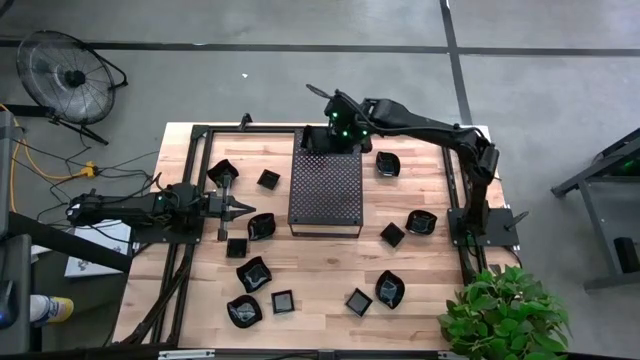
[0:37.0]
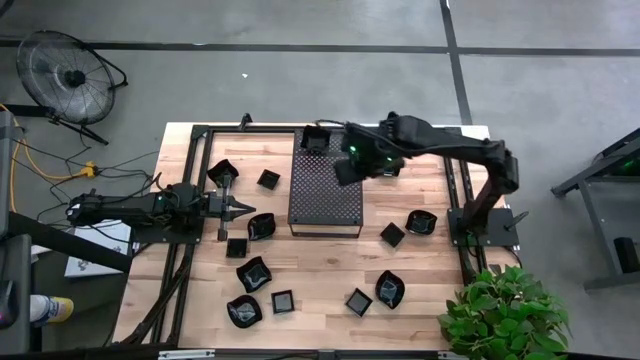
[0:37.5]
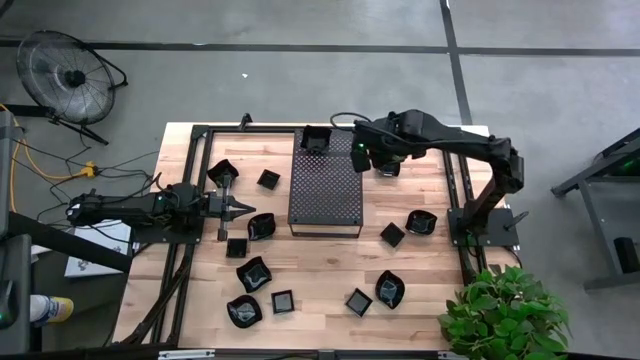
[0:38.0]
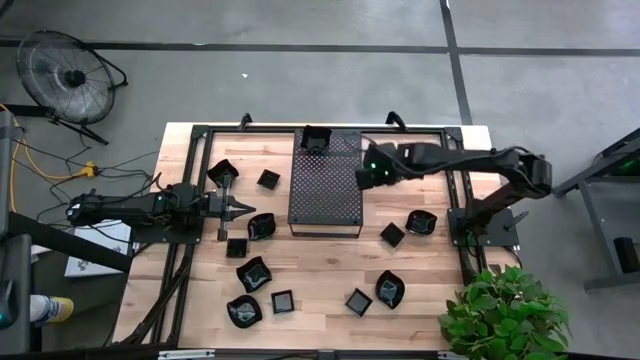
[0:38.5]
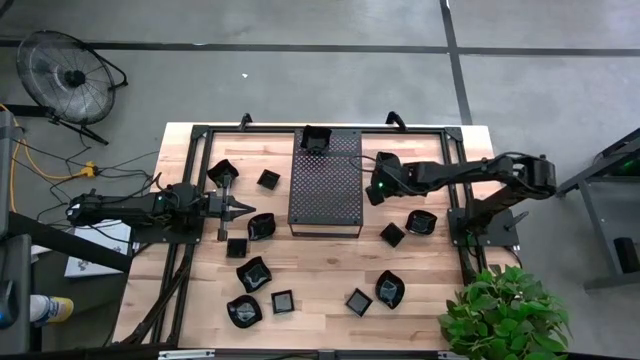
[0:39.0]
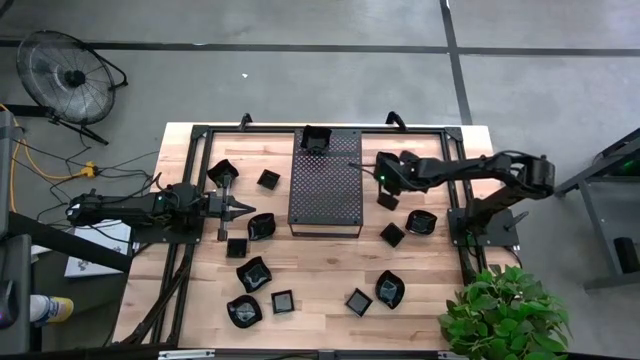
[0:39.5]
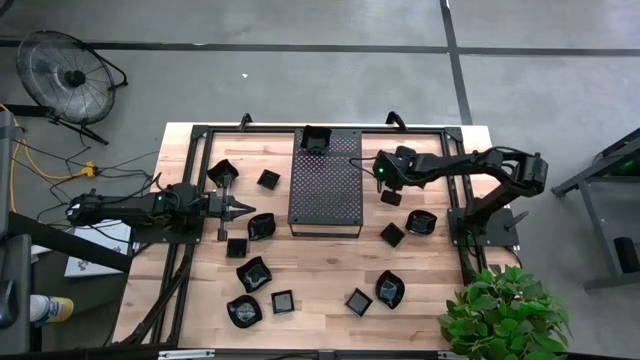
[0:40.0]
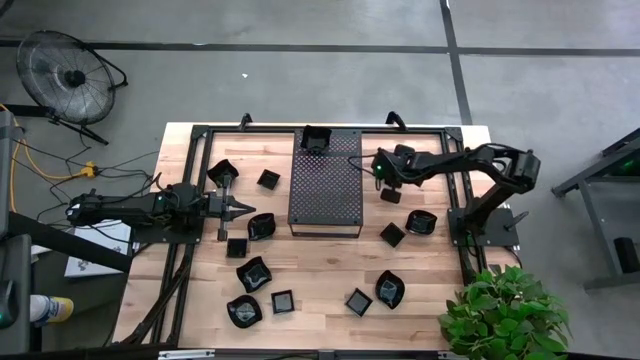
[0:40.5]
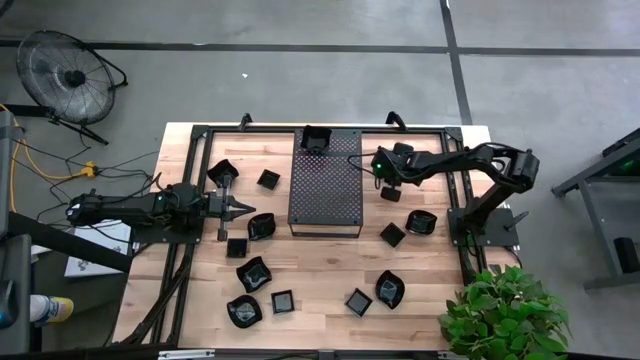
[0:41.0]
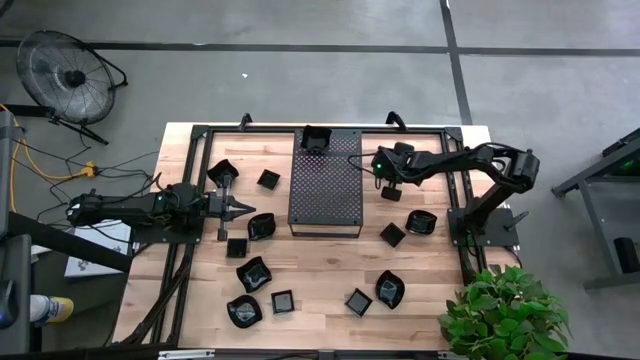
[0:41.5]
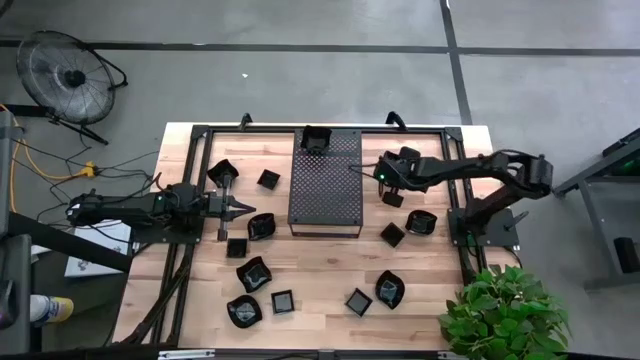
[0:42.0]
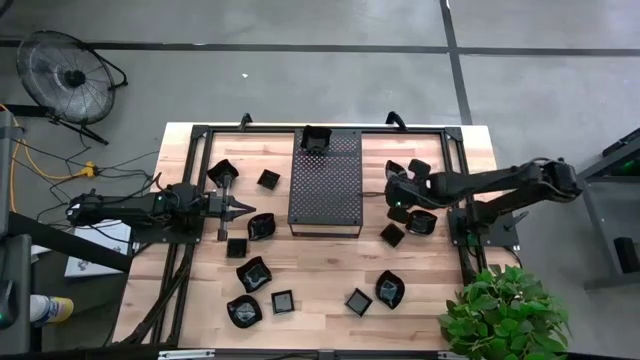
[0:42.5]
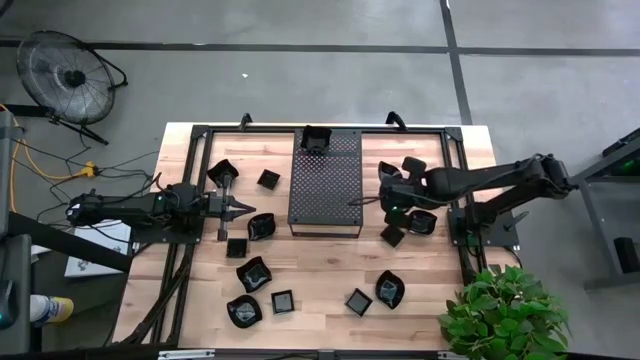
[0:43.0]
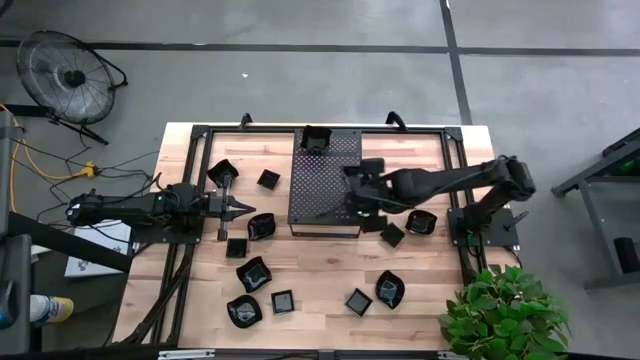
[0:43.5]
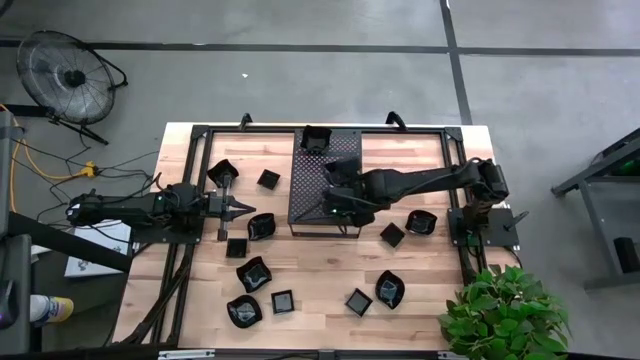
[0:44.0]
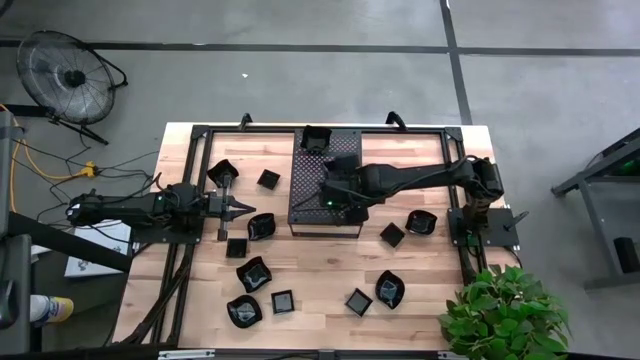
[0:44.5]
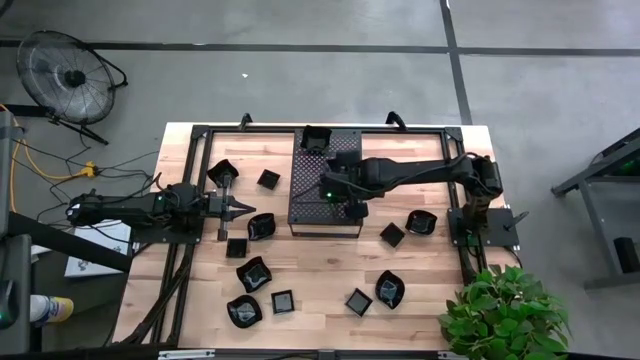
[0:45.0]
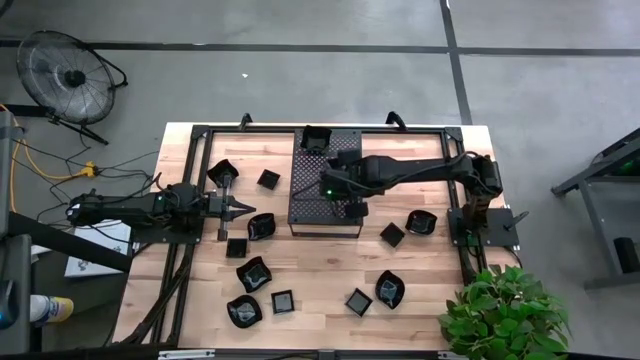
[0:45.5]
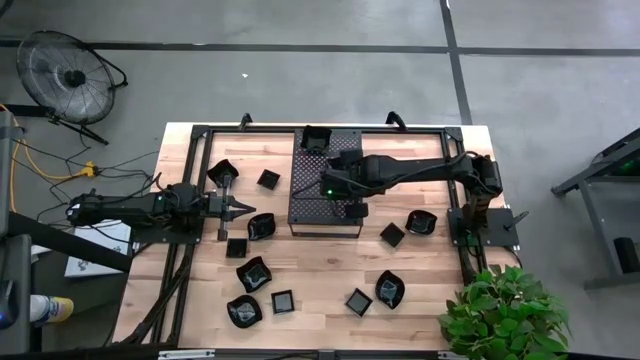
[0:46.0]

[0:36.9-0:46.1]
Task: Pick & Place Mini shaped plates
Put the black leaf shaped plate on the shelf

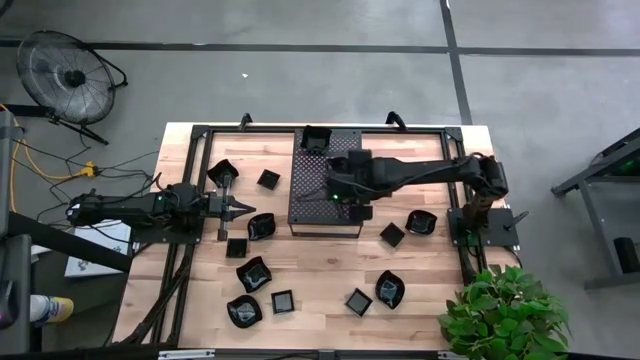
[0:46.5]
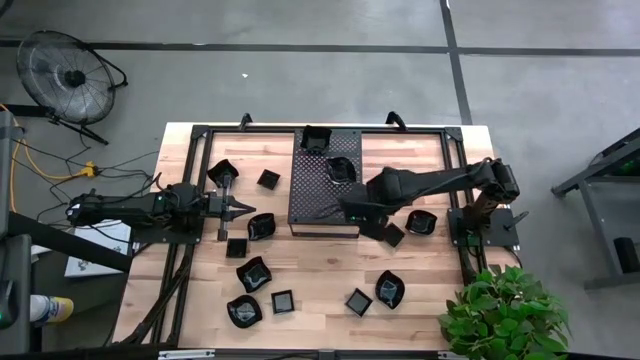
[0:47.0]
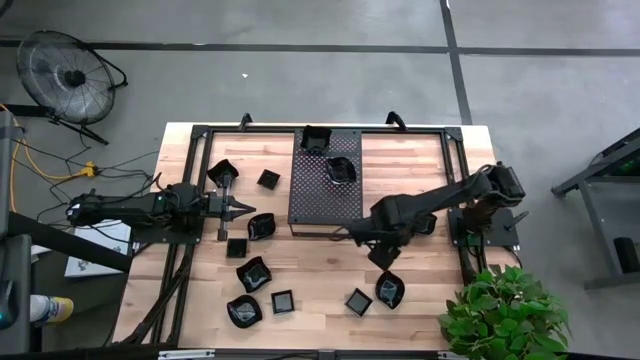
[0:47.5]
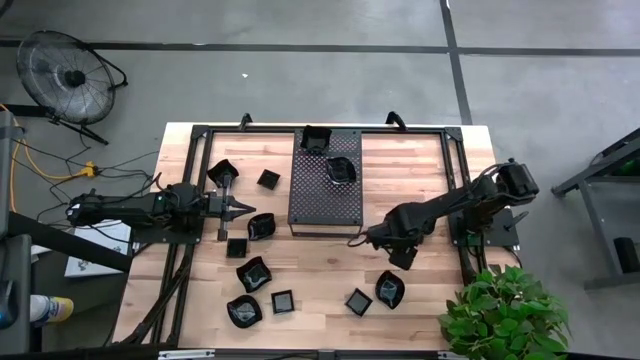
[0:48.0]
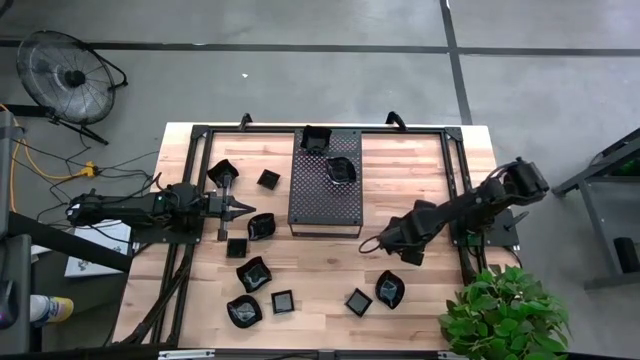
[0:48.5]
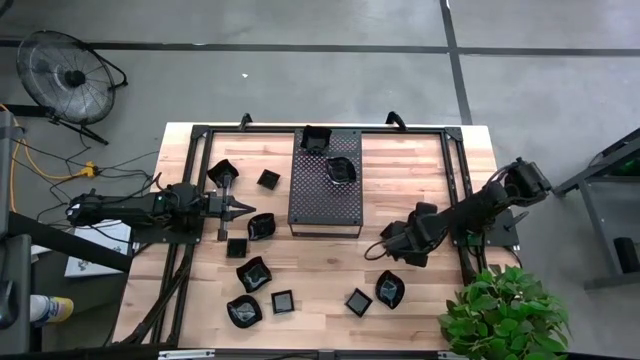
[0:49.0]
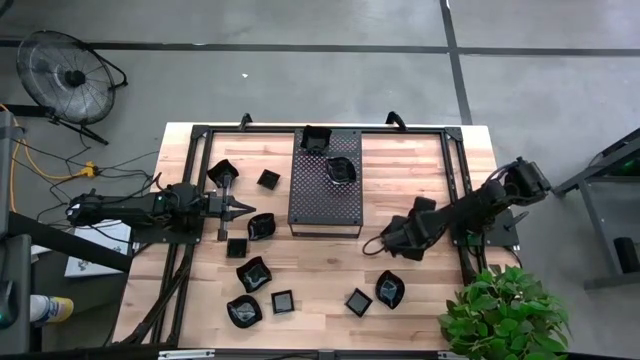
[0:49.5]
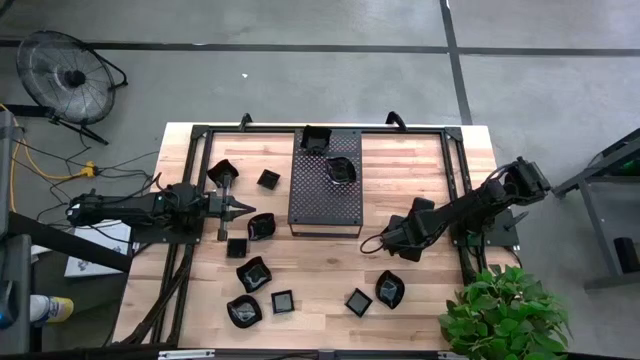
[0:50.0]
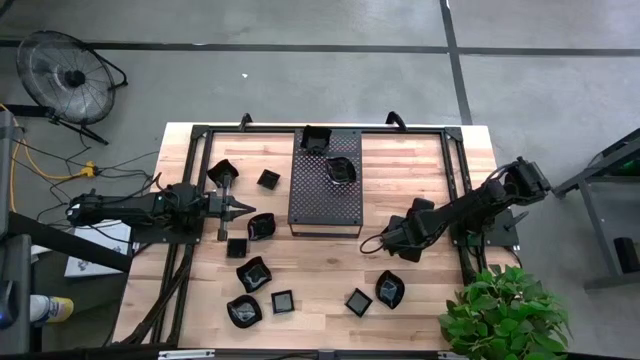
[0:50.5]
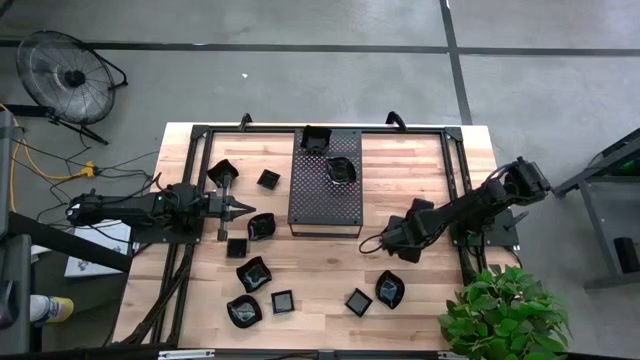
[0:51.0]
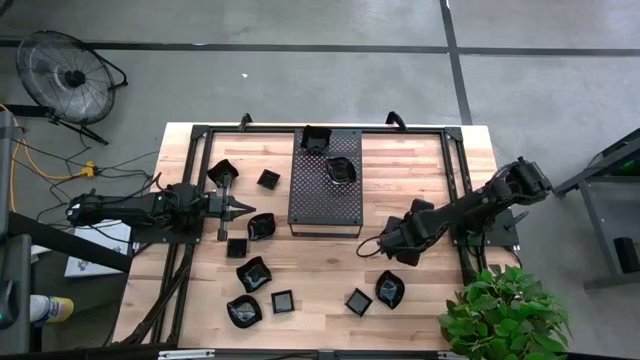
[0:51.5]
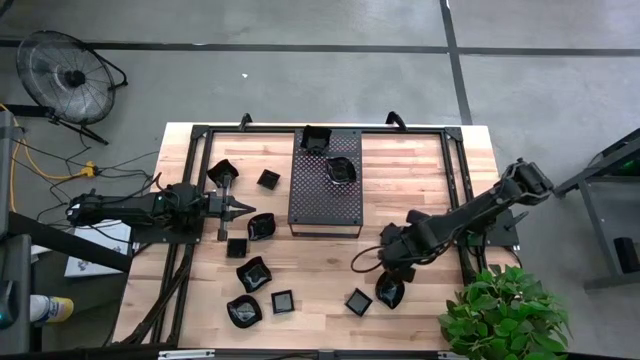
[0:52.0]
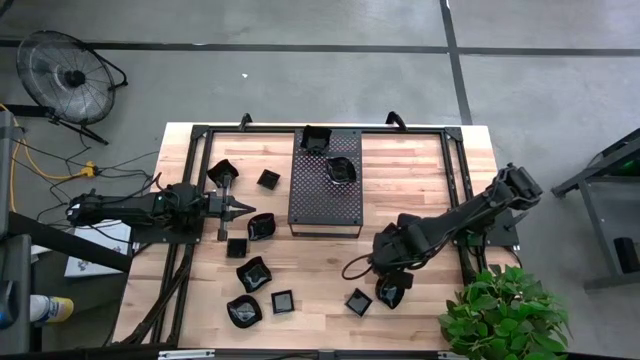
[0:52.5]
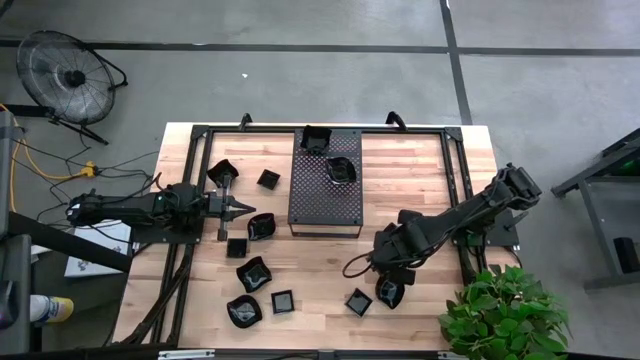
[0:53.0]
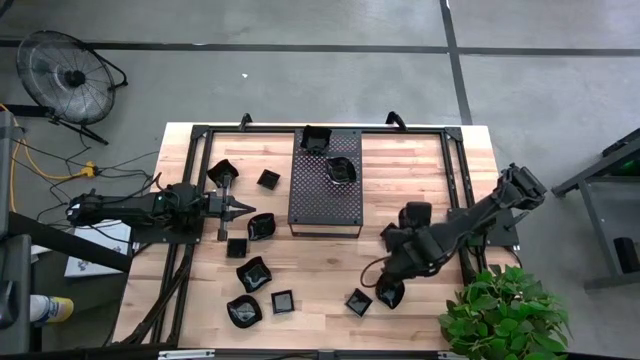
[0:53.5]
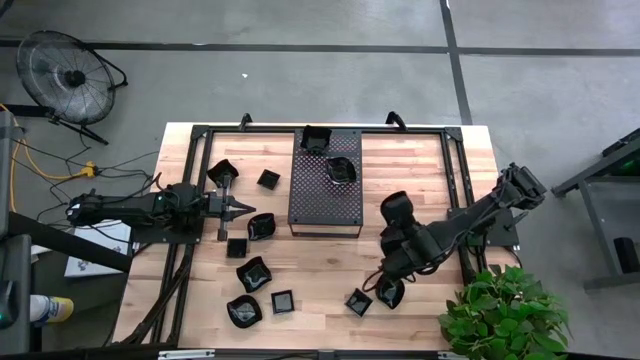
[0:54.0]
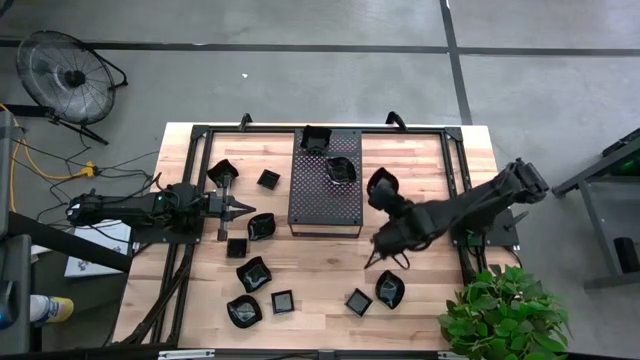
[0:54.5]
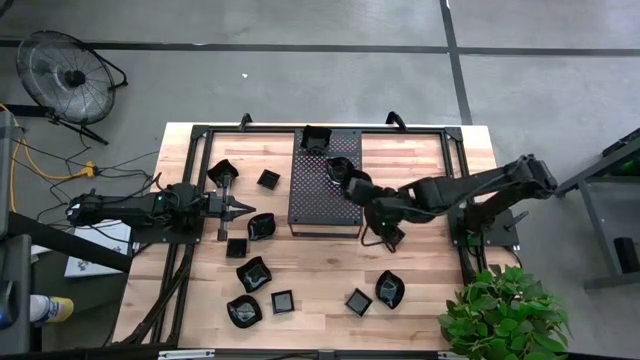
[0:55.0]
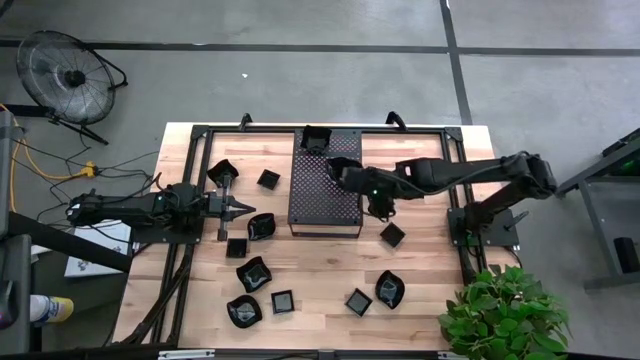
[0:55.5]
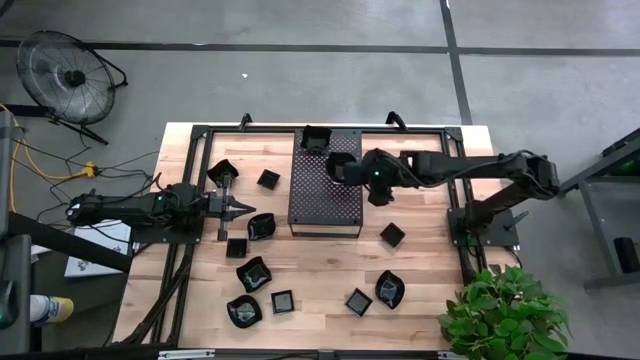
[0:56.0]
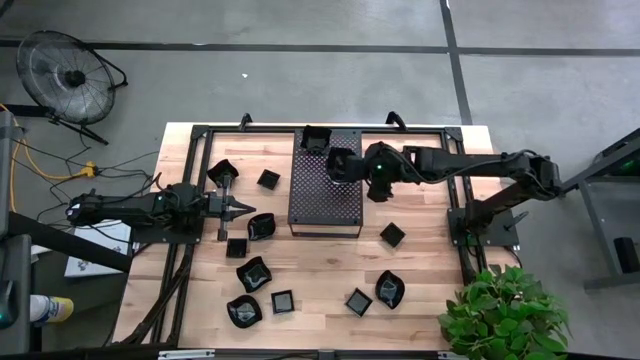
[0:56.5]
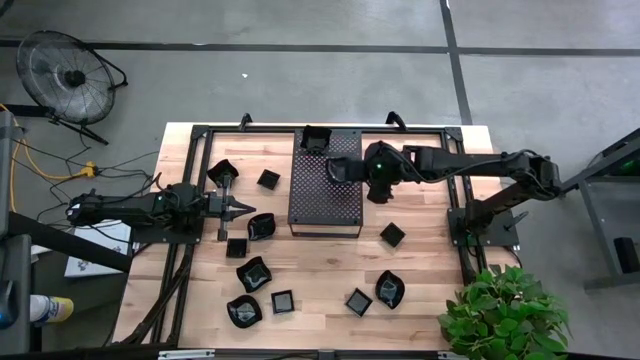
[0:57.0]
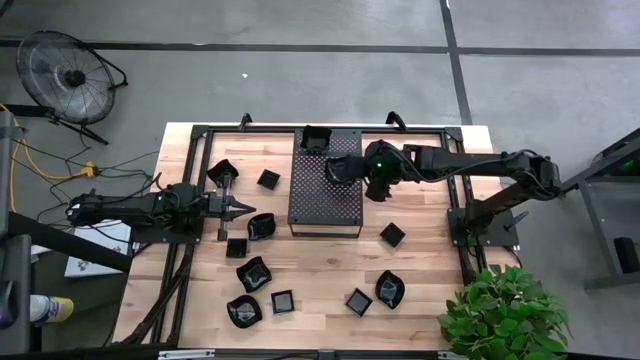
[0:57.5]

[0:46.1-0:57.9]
Stack the black leaf shape plate on top of the other black leaf shaped plate on the shelf

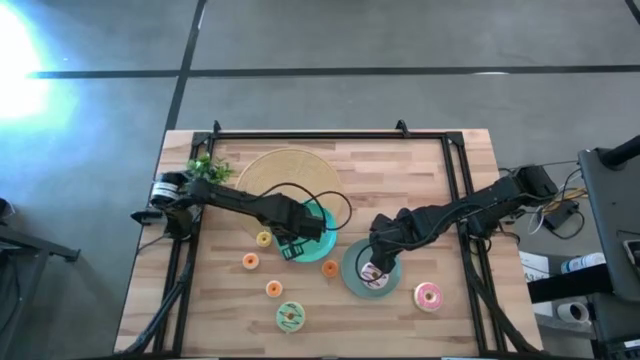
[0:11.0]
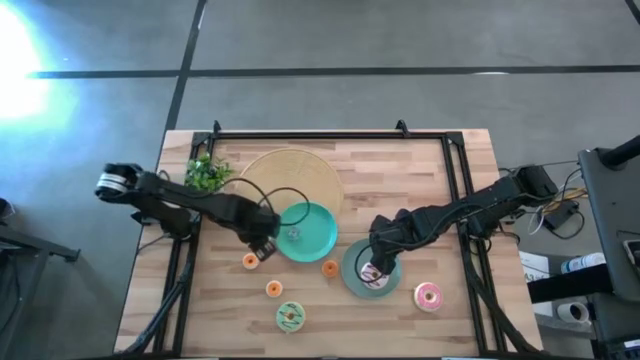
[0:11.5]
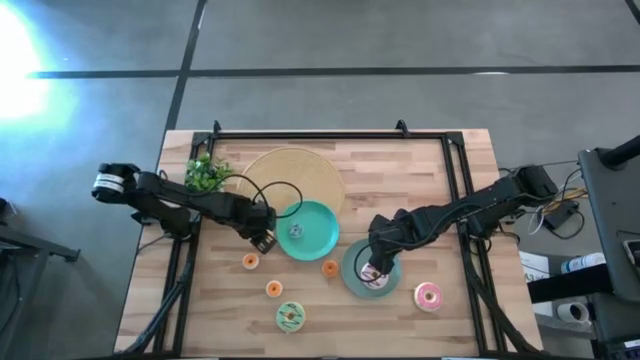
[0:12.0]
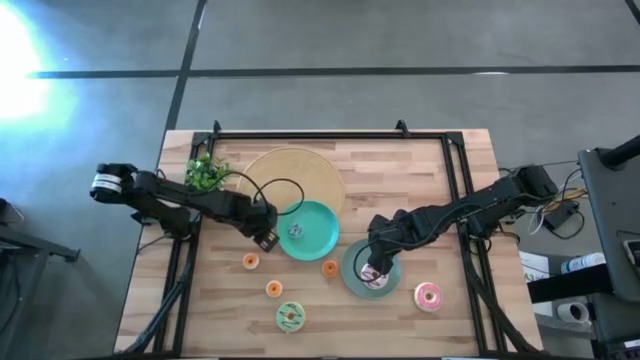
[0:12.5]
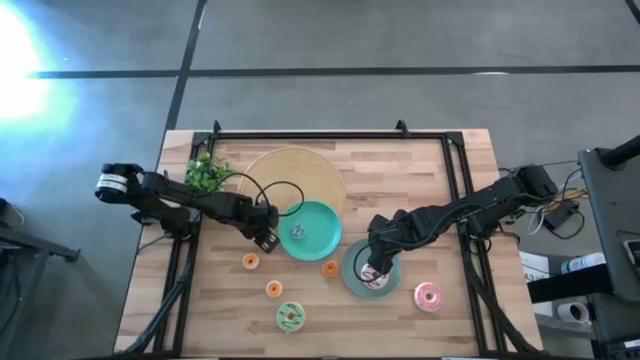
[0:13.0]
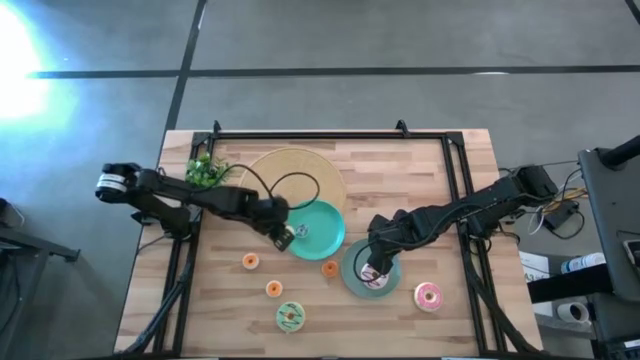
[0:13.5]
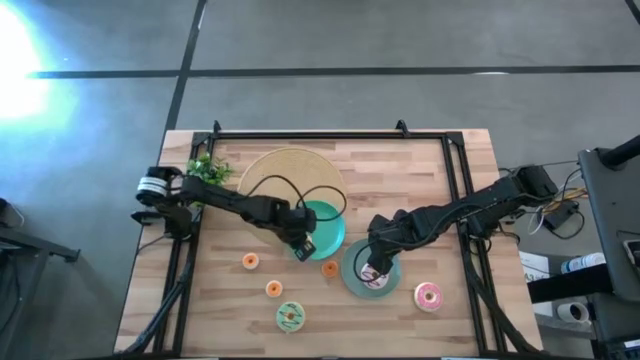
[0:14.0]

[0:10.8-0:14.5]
Task: Pick & Place donuts
Put the small yellow doughnut on the blue plate
